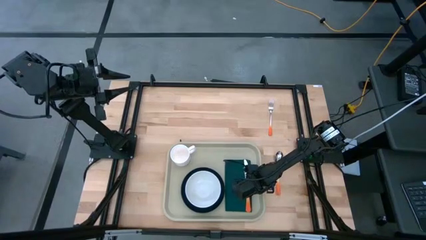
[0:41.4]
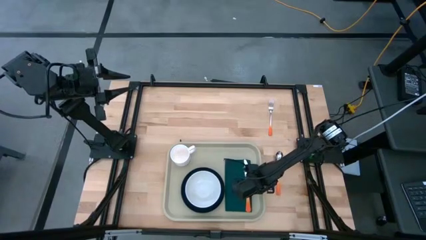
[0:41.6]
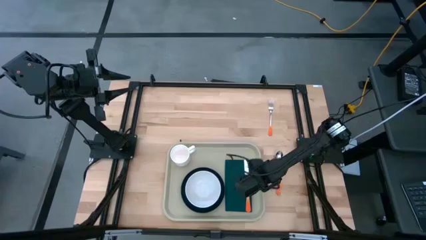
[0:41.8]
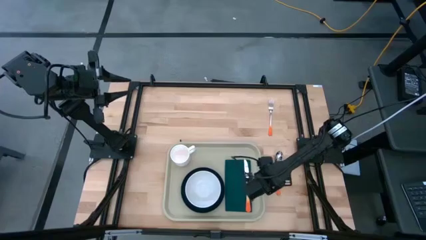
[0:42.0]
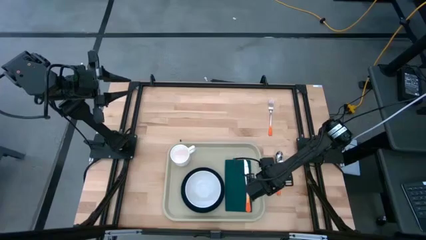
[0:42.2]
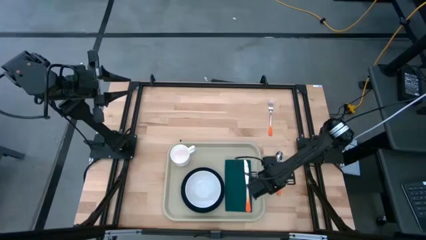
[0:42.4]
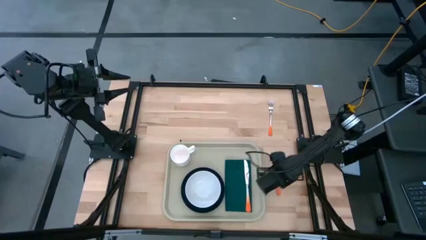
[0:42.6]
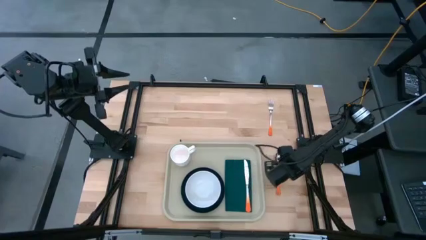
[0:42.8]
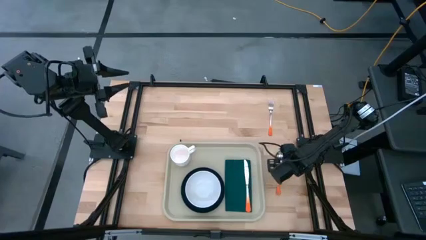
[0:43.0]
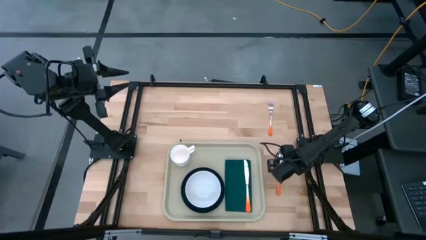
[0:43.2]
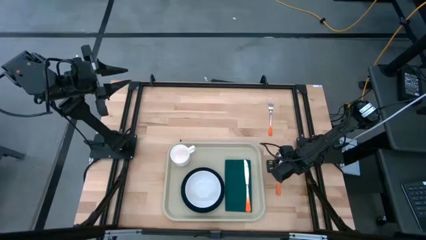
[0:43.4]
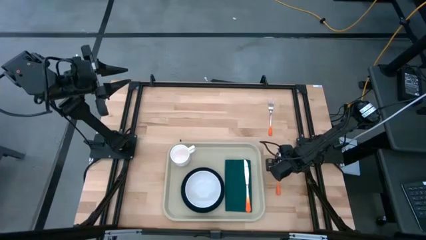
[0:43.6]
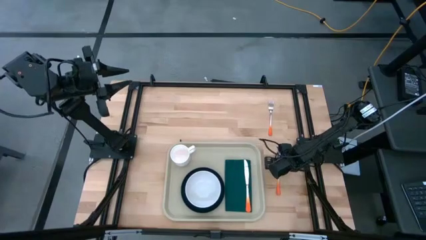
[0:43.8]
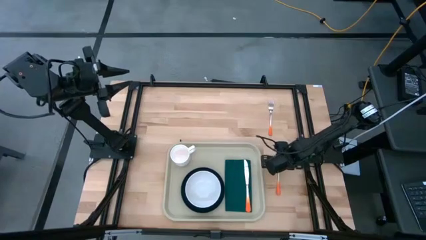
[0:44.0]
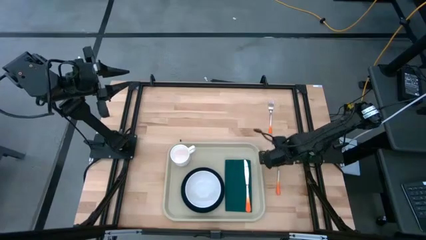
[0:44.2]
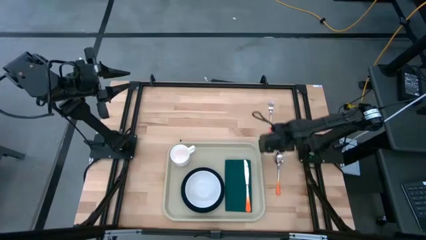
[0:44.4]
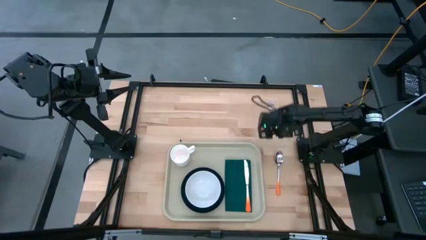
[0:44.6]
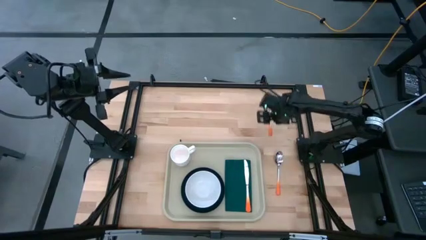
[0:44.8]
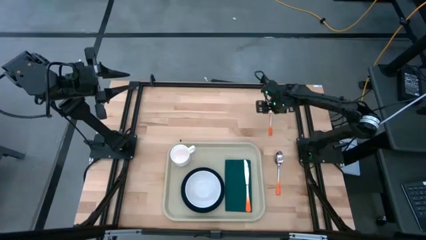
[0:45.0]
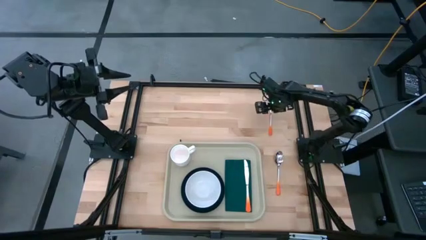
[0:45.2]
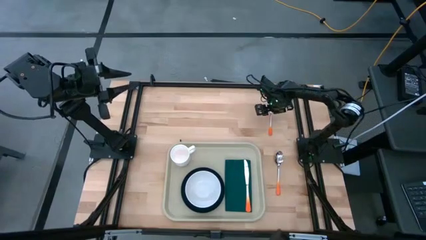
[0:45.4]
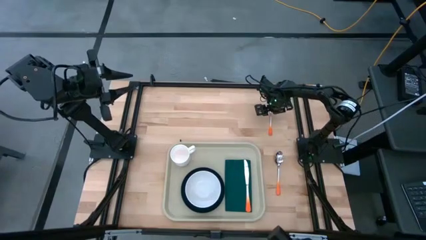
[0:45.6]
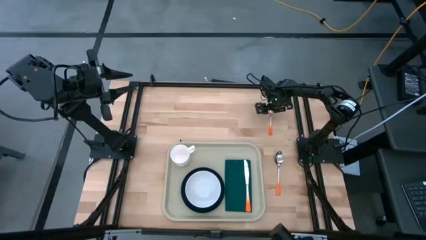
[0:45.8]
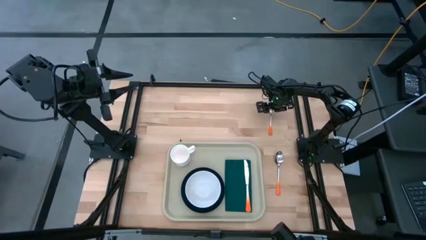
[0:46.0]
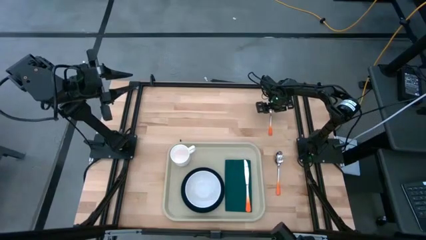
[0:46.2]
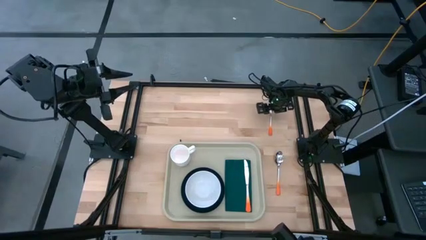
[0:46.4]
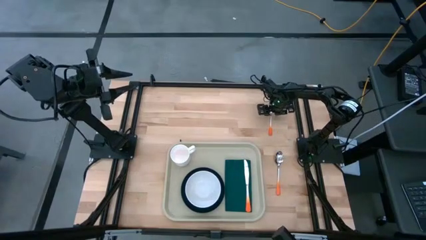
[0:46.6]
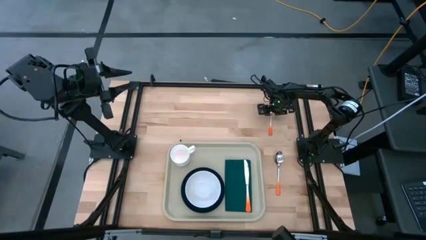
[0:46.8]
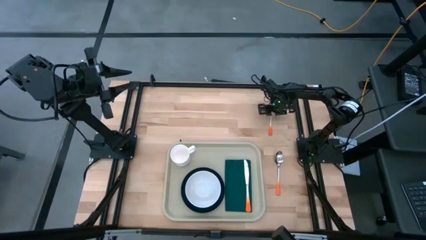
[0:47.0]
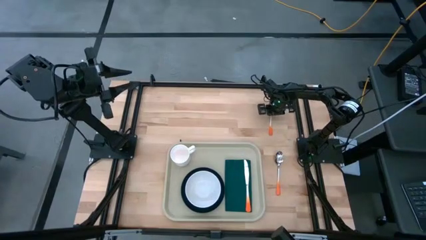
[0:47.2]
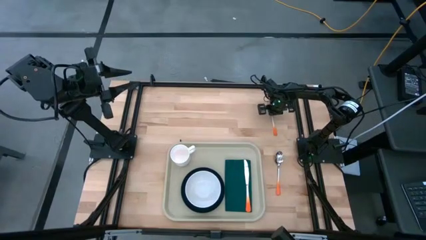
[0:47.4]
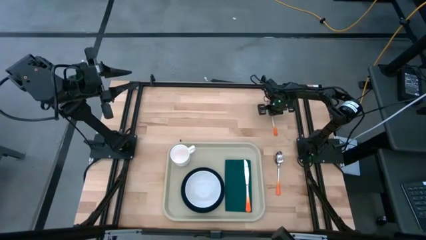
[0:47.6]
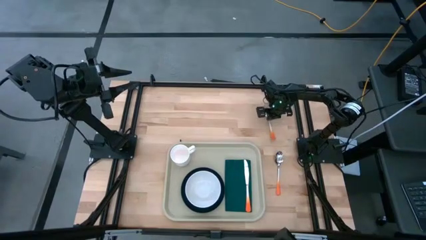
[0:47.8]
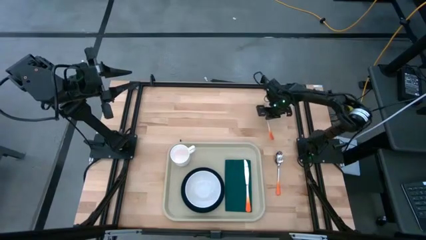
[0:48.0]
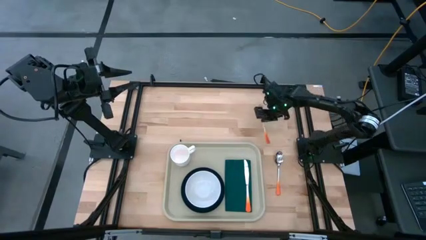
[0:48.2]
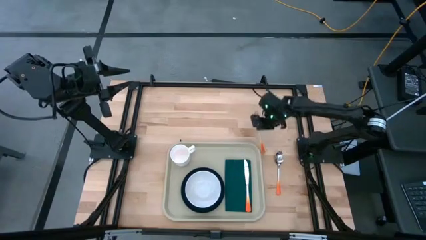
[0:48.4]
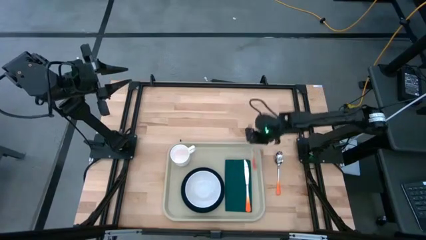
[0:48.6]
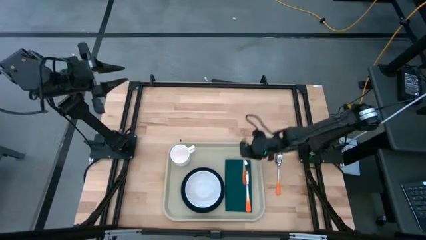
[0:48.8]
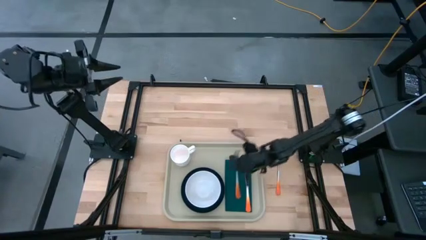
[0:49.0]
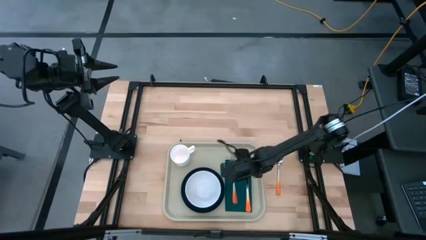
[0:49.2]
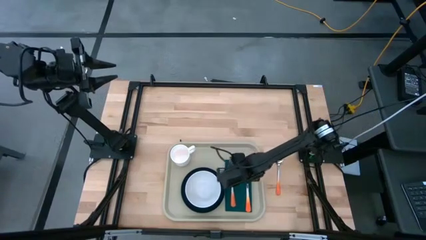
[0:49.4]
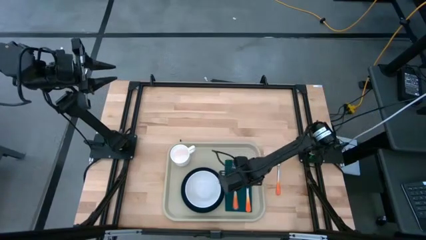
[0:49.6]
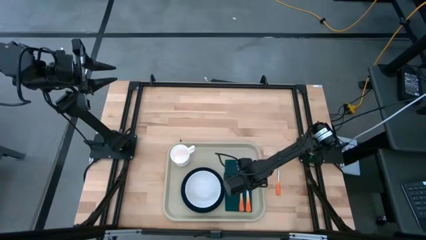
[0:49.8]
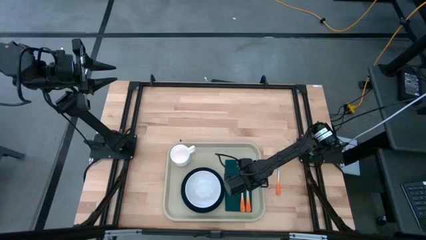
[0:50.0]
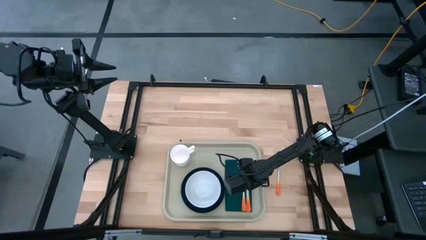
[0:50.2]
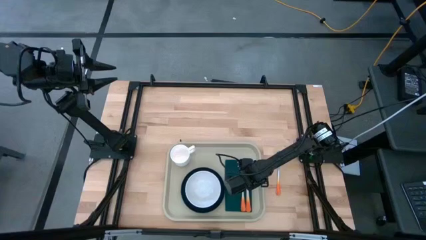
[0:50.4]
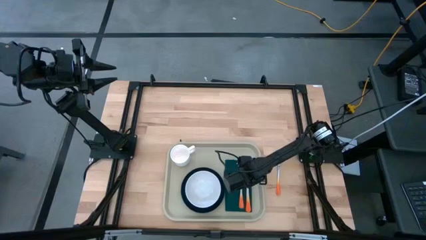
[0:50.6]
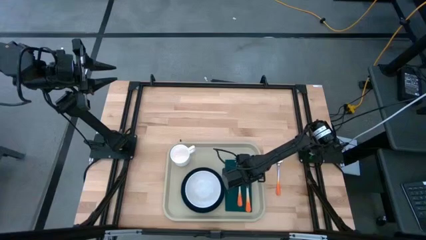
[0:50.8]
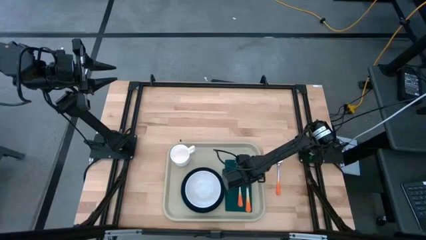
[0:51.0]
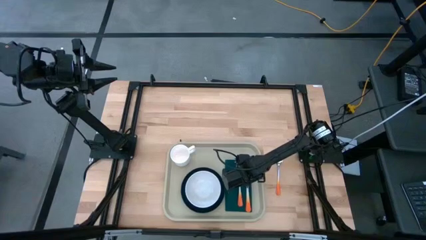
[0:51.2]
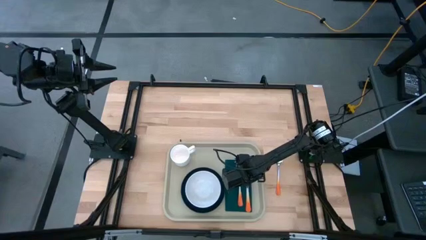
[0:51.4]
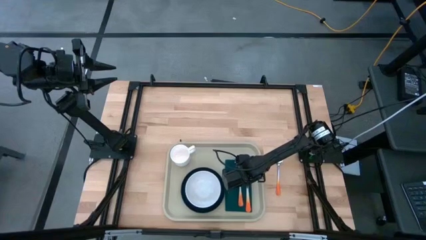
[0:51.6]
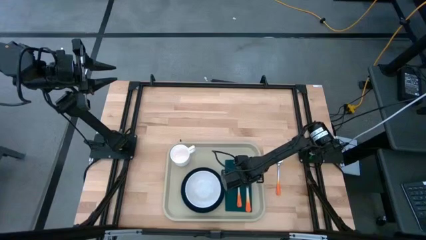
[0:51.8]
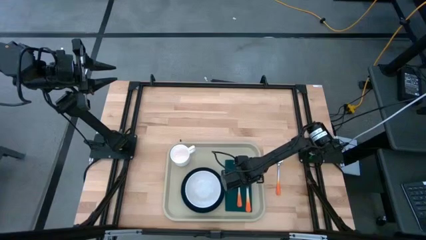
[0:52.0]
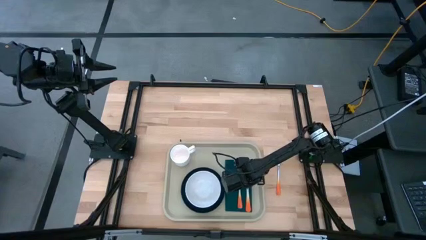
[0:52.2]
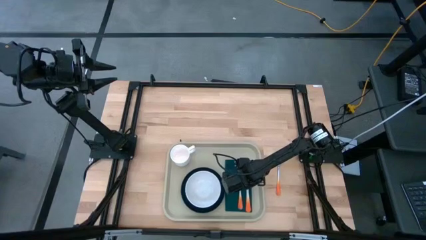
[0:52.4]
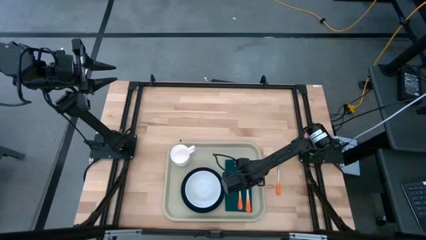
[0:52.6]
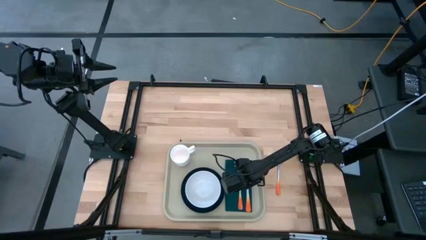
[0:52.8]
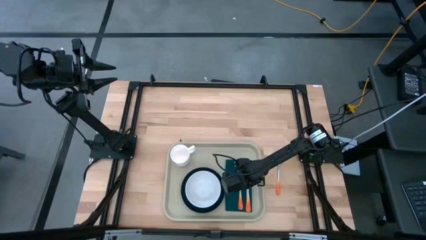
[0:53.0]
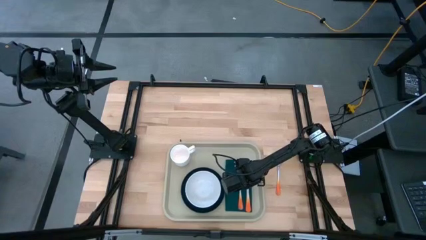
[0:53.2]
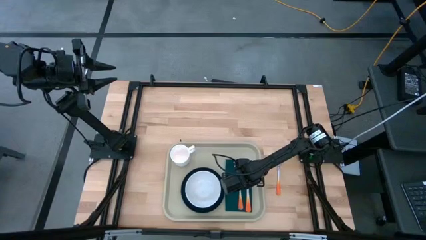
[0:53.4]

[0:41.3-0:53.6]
Task: Set up tray
Put the orange fork on top of the green napkin to the left of the orange knife

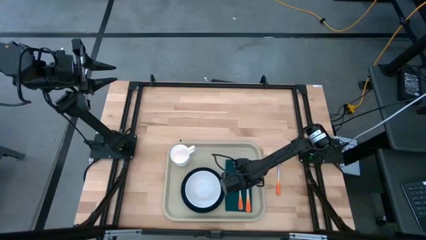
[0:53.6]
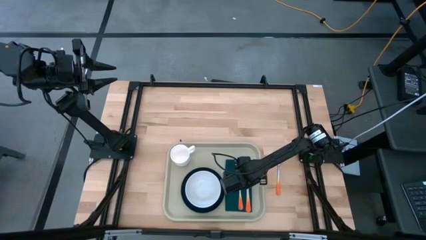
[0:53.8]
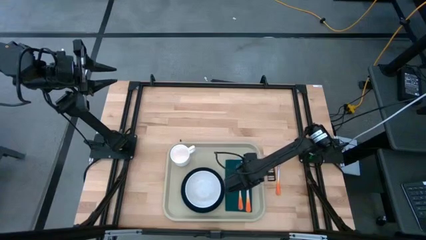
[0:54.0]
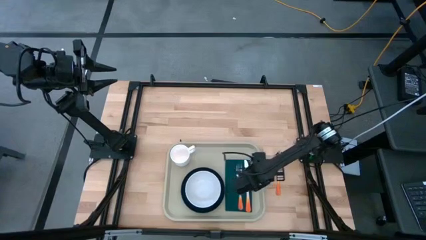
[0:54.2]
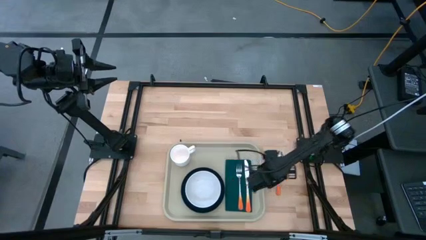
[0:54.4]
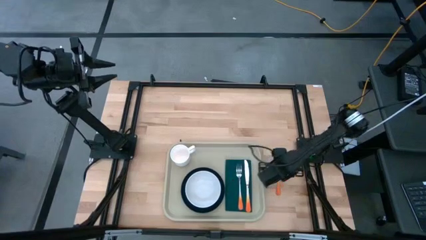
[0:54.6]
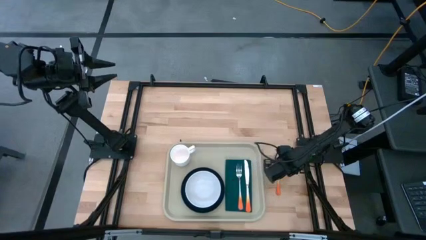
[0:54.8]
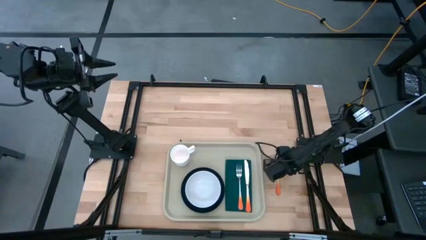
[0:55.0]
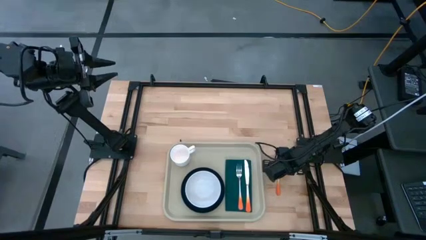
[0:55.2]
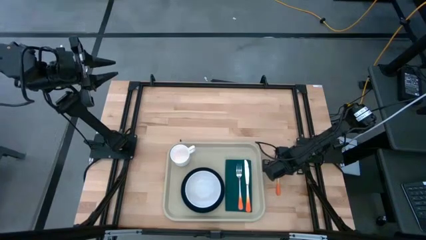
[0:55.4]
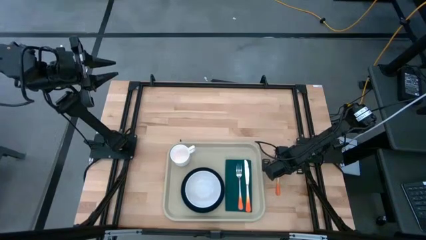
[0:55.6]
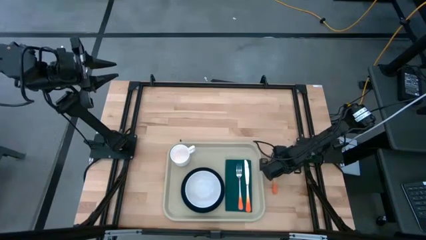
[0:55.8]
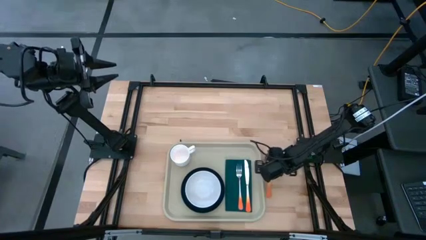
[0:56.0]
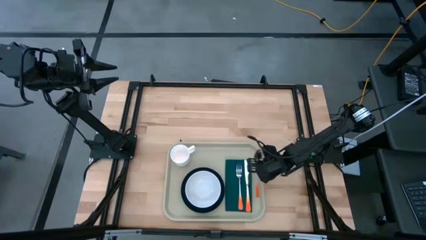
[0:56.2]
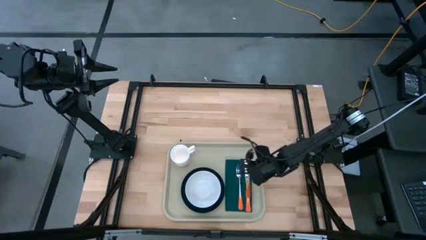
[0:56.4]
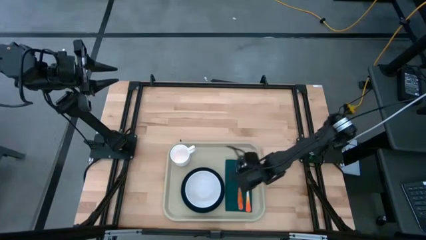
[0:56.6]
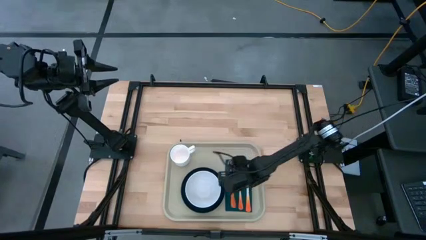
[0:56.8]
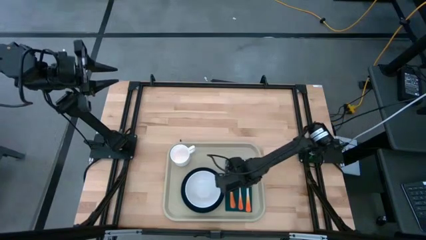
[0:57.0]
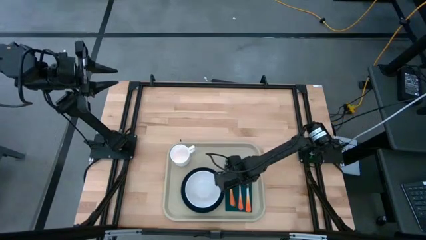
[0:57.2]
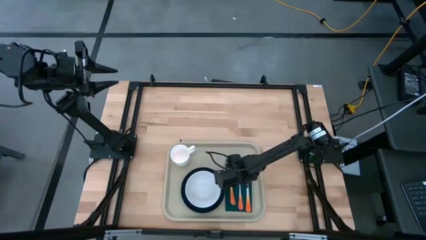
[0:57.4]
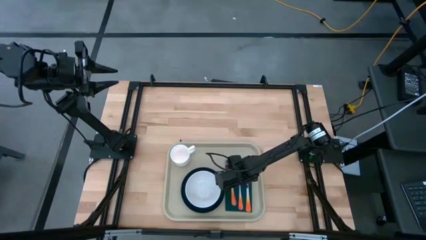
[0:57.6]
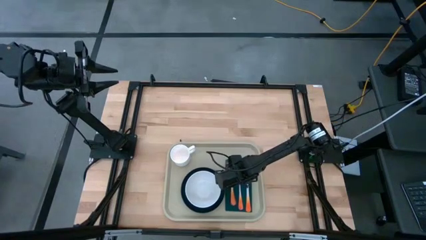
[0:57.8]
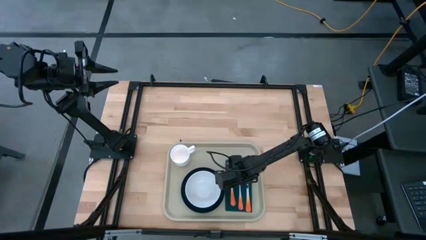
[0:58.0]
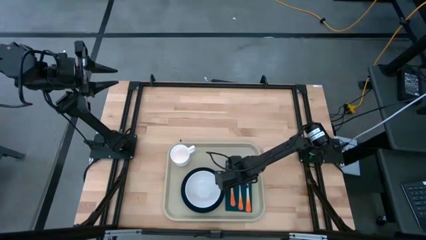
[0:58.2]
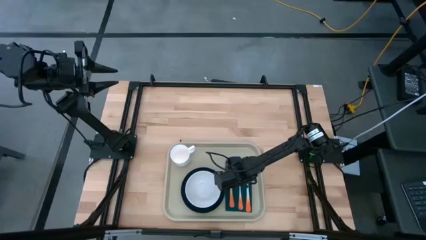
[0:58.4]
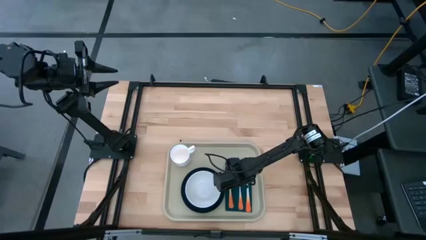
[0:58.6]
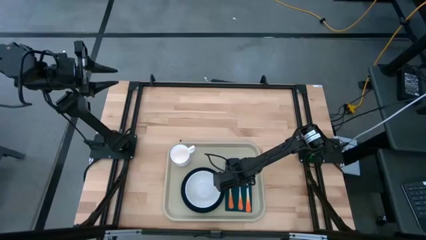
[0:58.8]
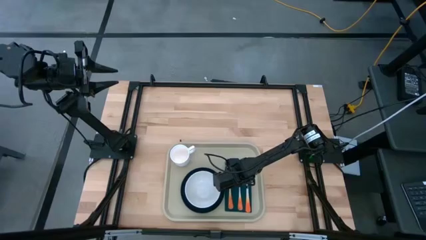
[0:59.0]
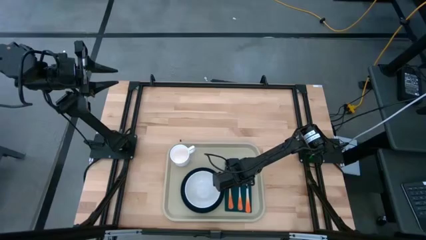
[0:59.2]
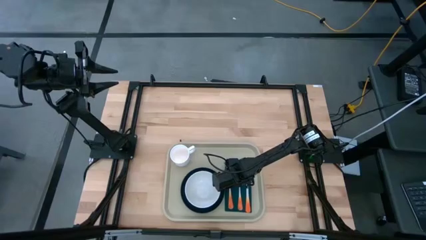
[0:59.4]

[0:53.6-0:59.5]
Put the orange spoon on top of the green napkin to the left of the orange fork
